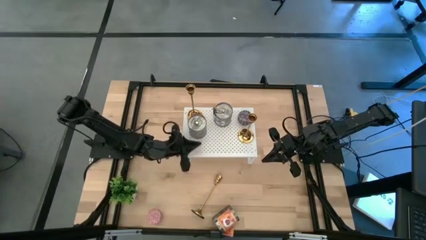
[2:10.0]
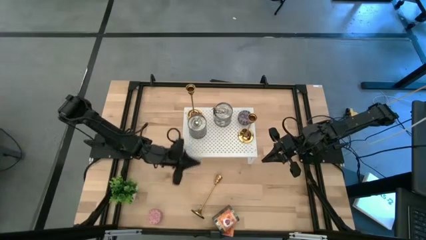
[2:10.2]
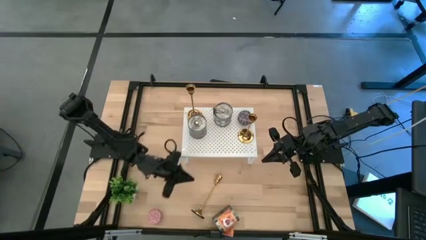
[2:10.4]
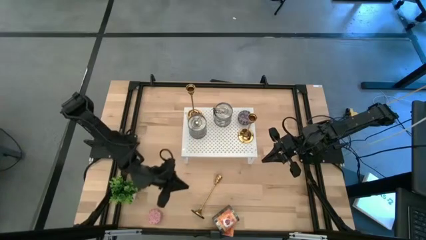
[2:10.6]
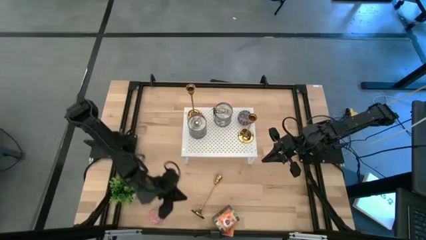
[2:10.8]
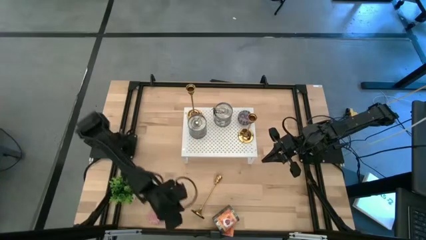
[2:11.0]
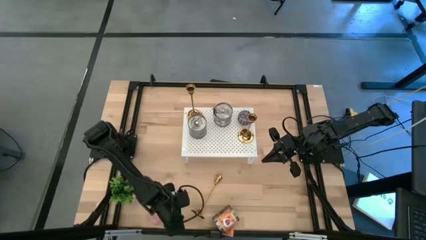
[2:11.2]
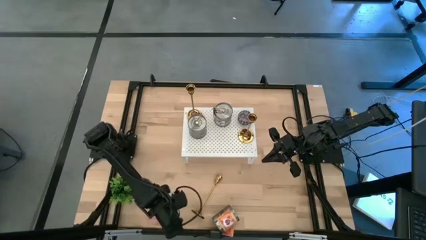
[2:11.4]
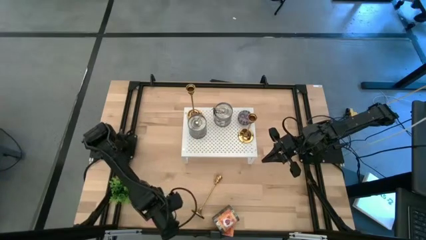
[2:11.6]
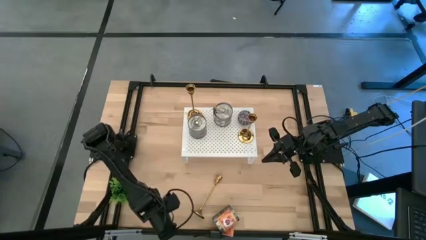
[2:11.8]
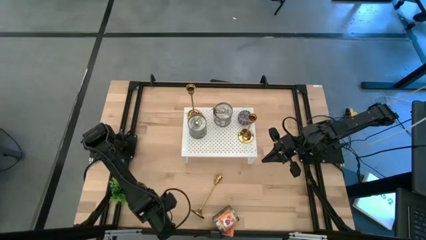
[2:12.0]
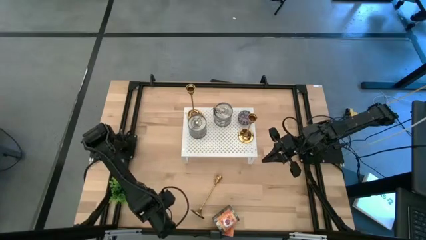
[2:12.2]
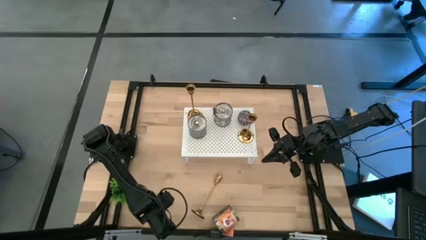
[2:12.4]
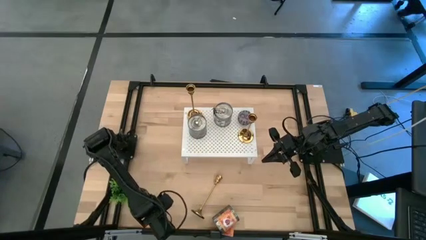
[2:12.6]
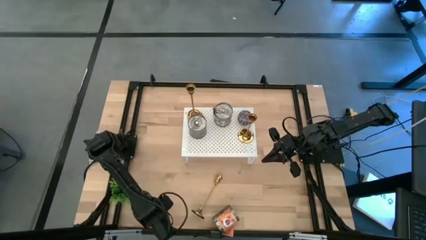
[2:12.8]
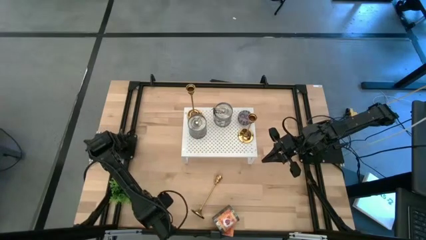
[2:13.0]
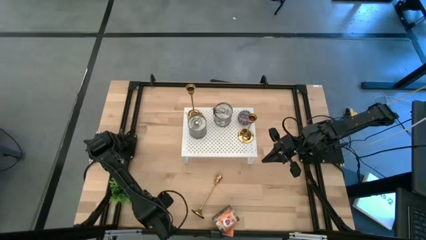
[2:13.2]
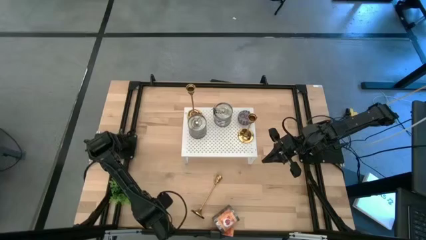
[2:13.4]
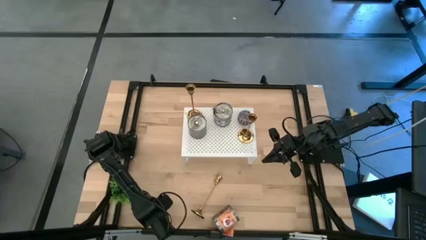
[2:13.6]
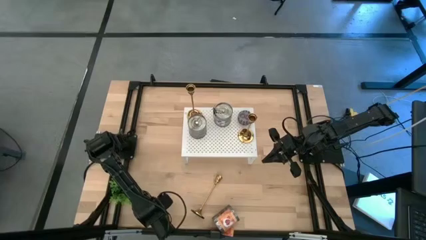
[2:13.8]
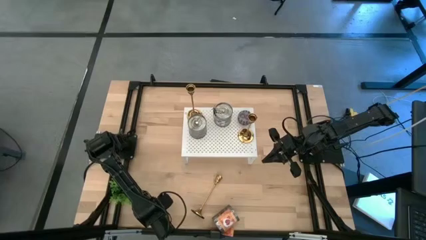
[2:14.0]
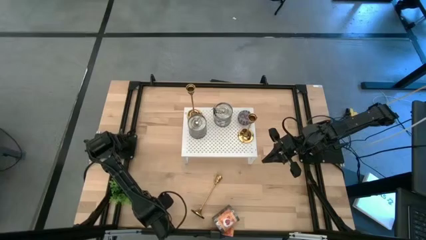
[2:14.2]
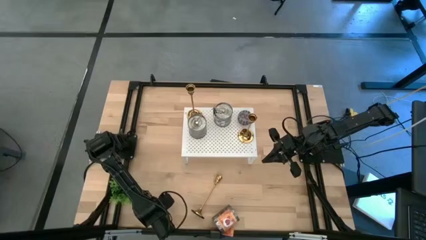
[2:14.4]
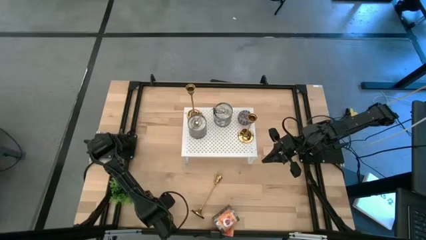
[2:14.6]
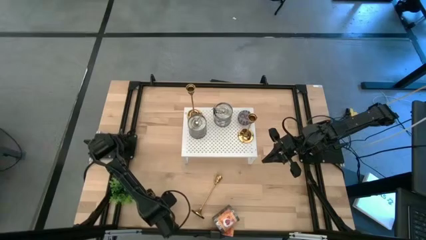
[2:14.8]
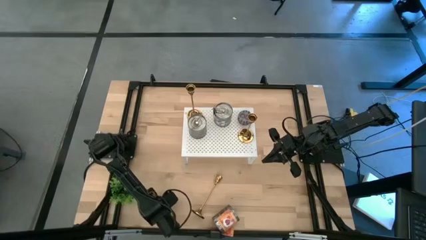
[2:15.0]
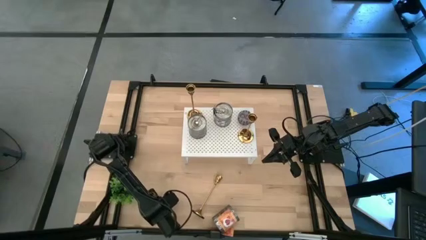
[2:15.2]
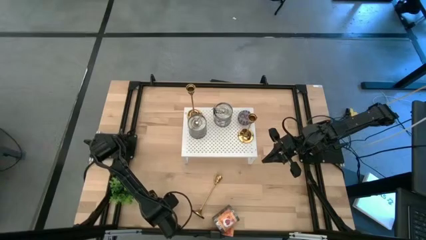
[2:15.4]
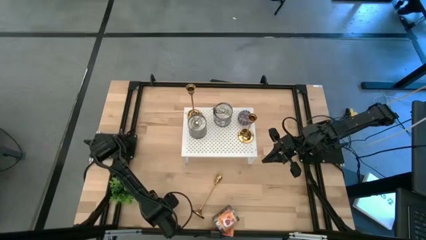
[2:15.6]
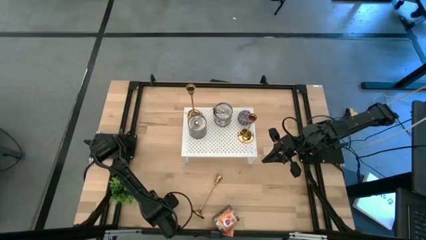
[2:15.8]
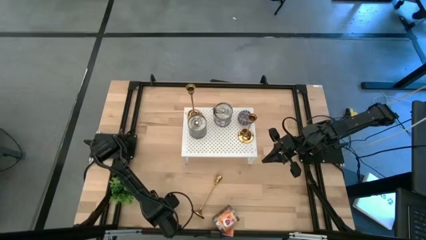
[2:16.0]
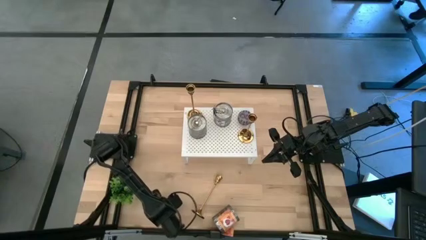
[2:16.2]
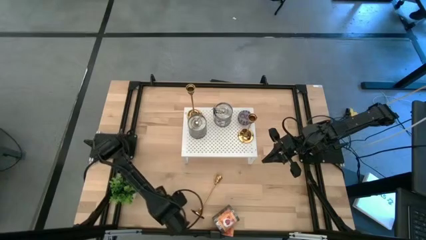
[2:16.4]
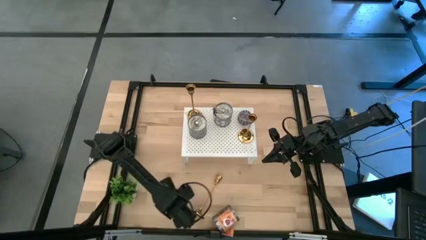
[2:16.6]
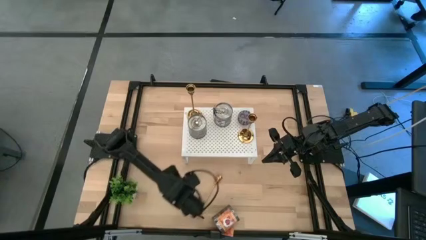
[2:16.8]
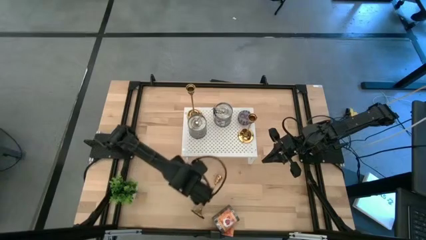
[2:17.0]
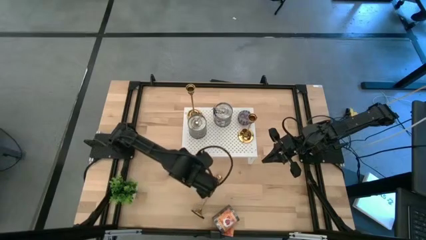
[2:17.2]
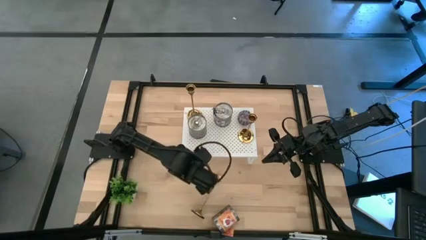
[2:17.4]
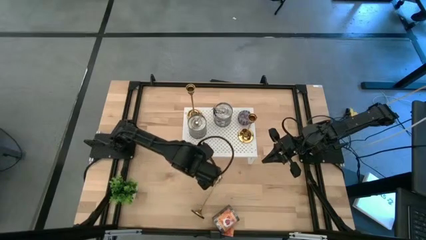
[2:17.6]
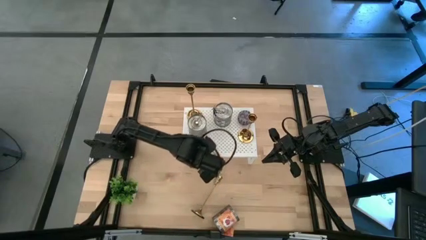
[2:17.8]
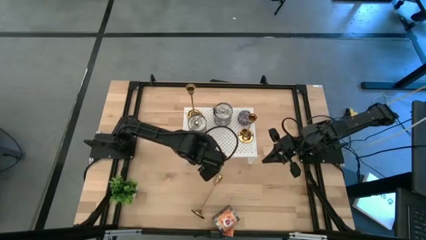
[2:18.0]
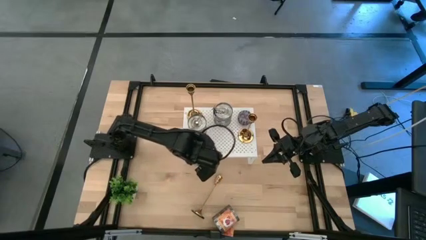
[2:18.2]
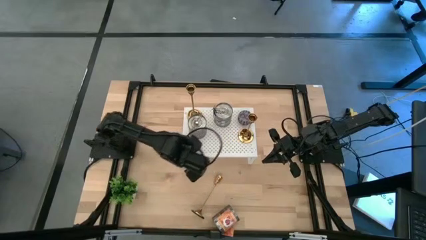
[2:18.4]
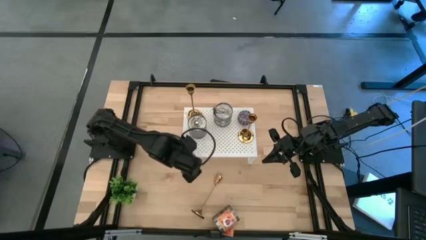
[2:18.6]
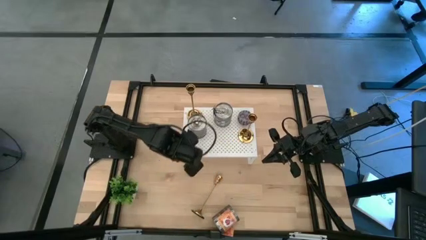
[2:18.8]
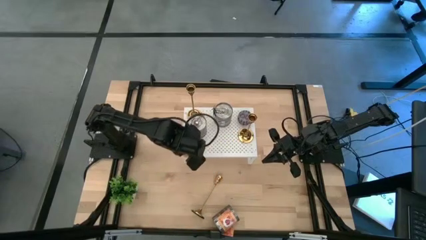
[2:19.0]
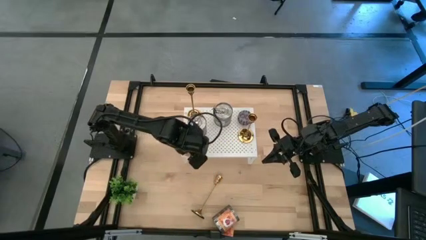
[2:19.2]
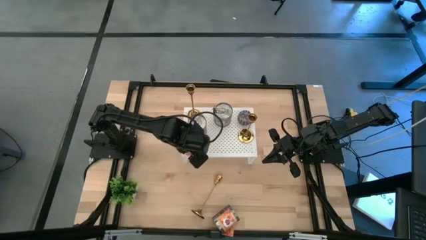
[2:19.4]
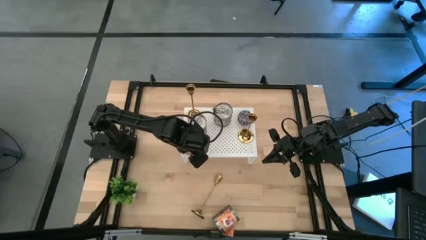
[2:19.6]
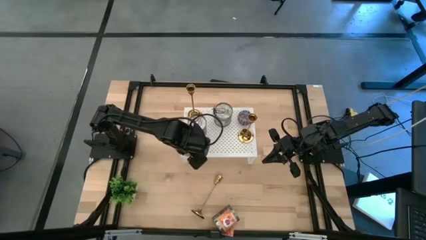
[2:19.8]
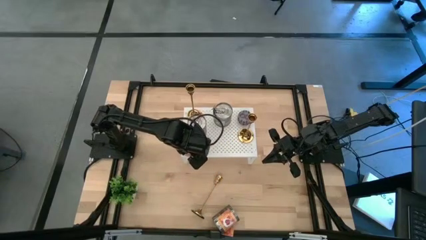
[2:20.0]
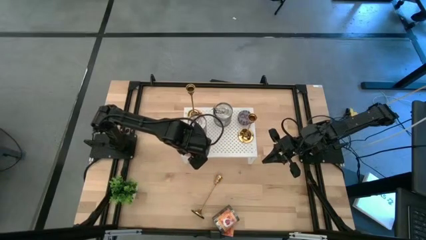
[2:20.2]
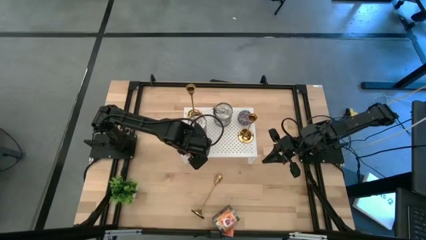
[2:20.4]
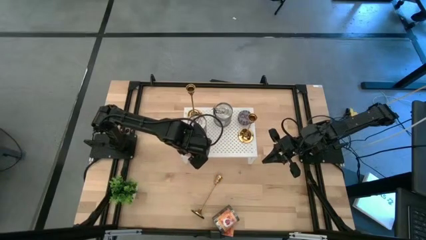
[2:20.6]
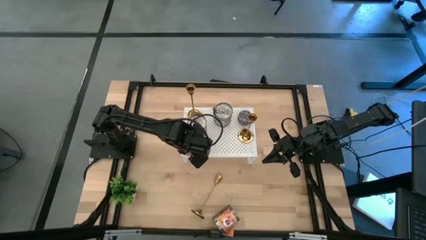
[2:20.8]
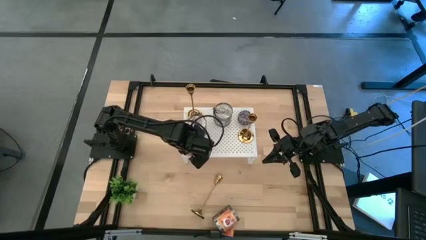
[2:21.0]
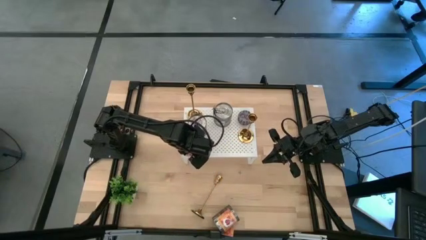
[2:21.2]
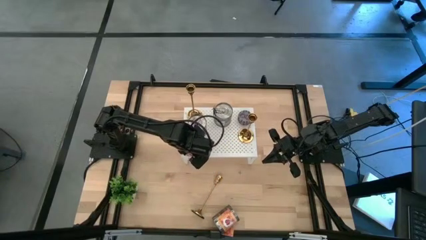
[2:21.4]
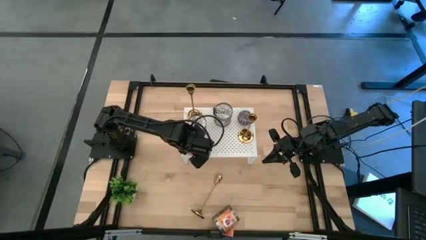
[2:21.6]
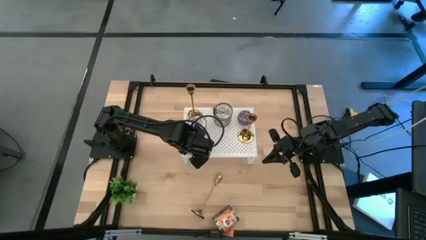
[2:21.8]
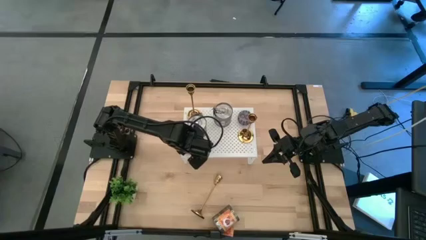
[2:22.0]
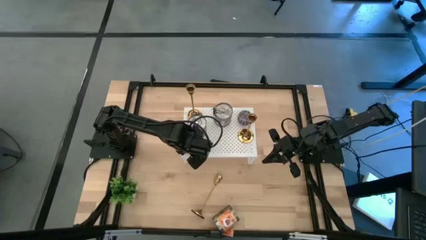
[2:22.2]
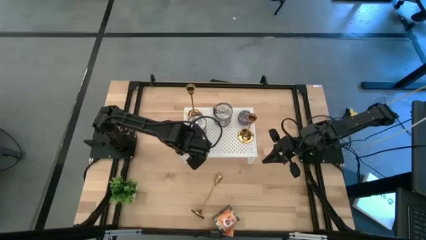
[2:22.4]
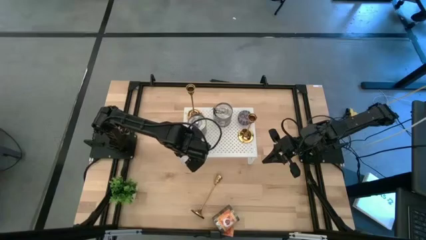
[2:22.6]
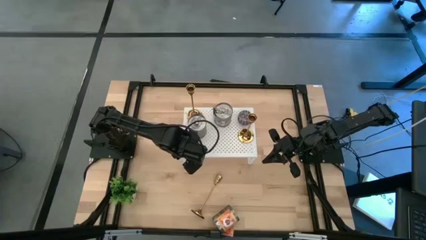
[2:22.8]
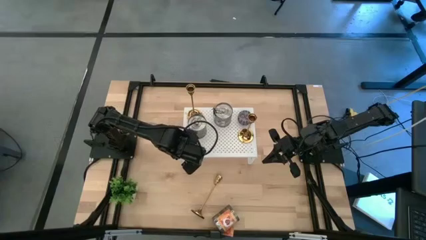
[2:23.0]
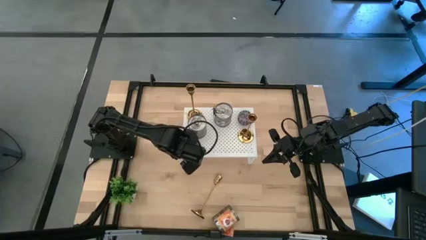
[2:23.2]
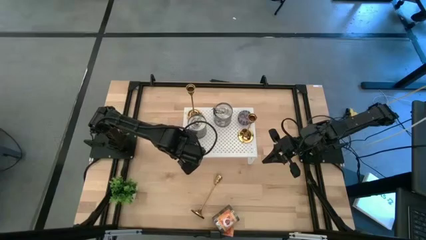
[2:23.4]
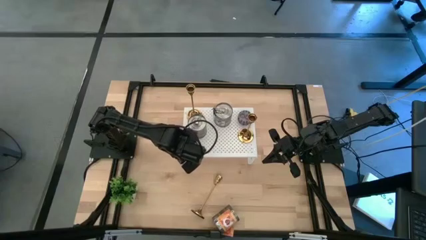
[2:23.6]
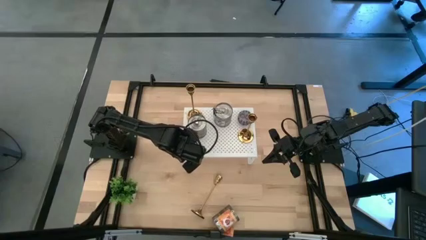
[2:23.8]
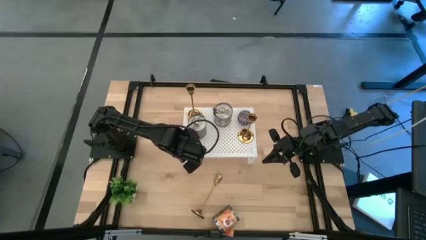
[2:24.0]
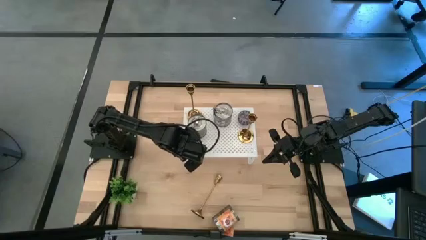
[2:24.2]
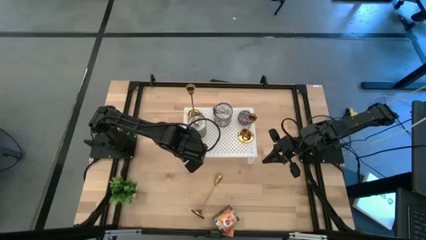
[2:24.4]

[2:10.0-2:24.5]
Task: Pick & Place candle stick holders
Put the small pink scented candle on the shelf

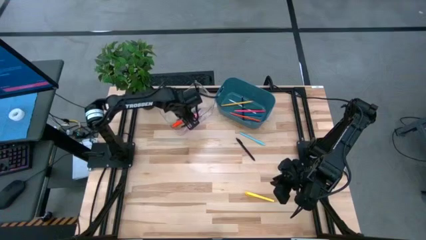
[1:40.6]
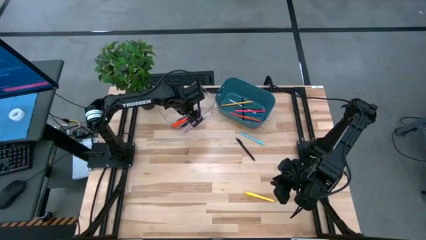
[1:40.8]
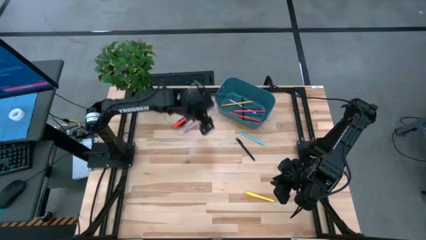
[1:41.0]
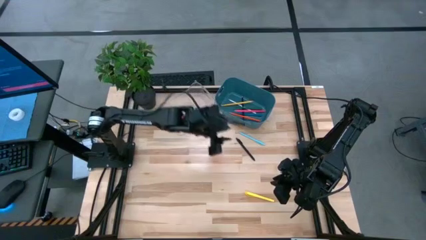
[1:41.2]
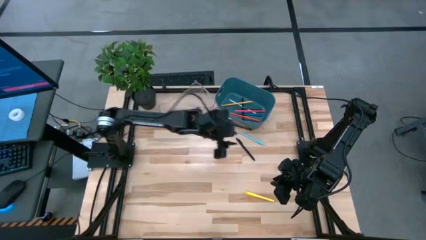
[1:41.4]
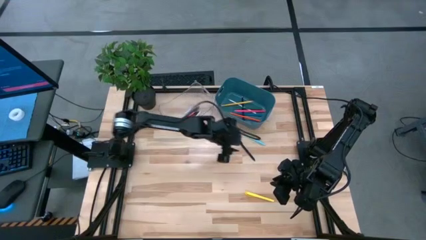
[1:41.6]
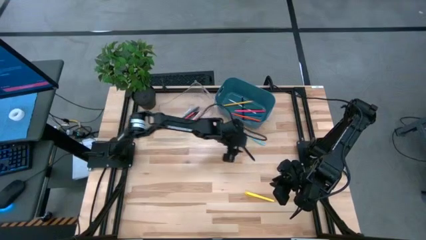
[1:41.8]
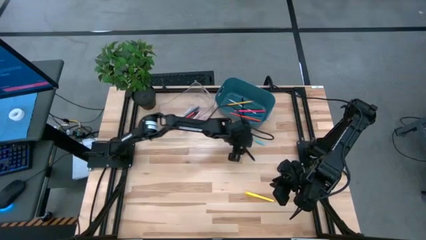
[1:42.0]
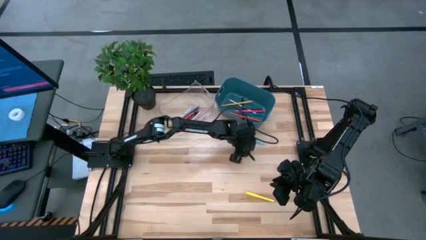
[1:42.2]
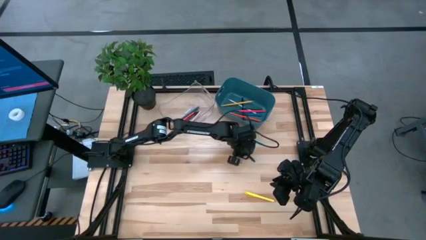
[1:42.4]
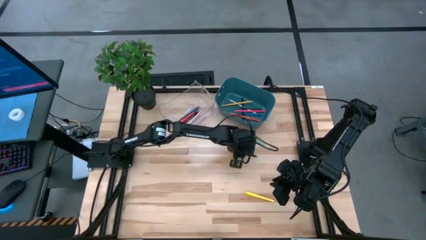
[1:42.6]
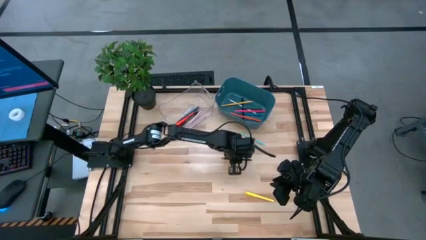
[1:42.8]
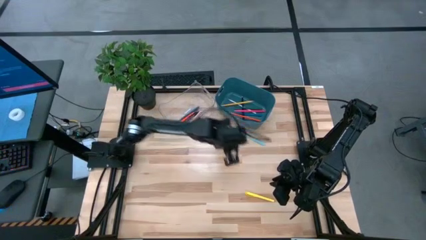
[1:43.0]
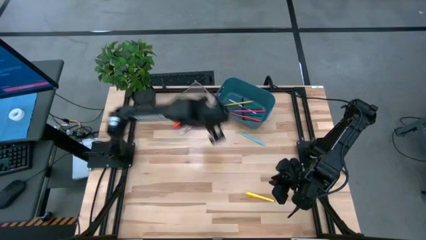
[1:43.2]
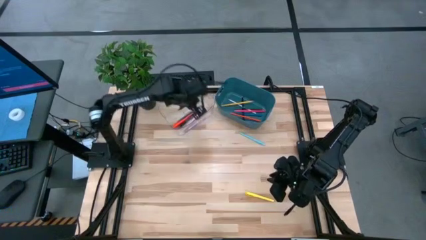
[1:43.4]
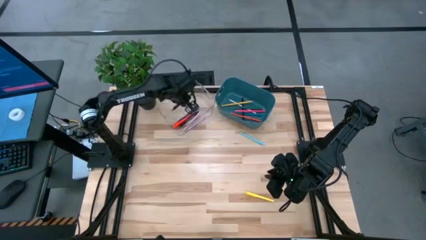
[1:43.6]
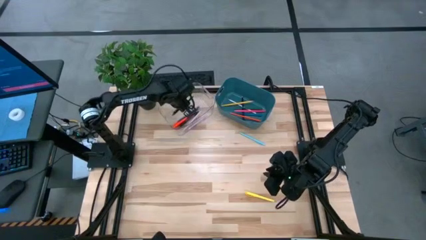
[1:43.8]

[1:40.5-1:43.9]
Task: Sort pens & pencils
Put the black pen into the transparent bin
